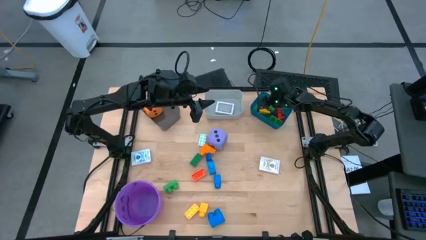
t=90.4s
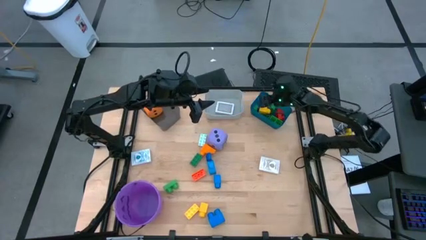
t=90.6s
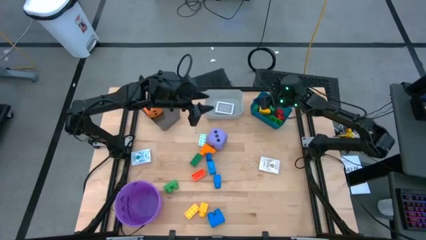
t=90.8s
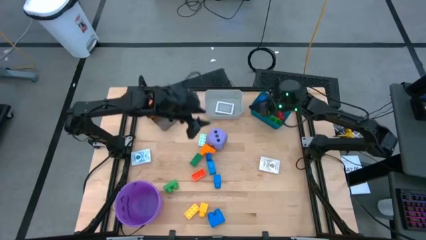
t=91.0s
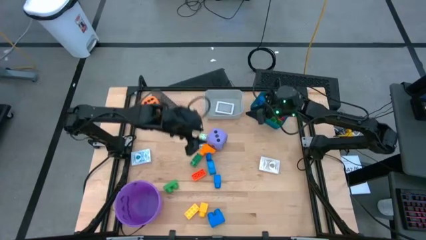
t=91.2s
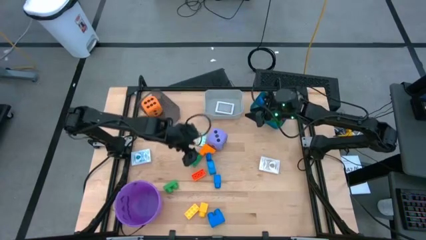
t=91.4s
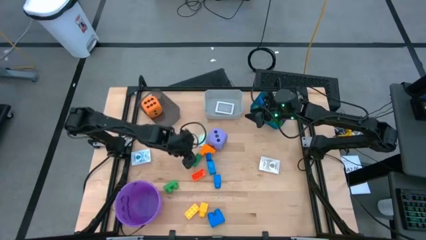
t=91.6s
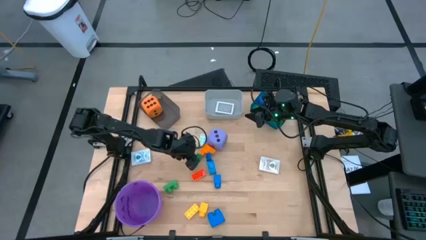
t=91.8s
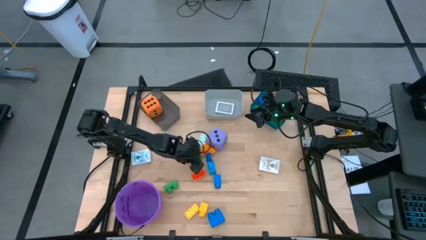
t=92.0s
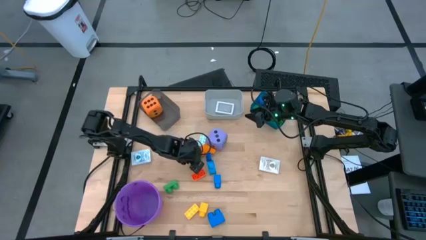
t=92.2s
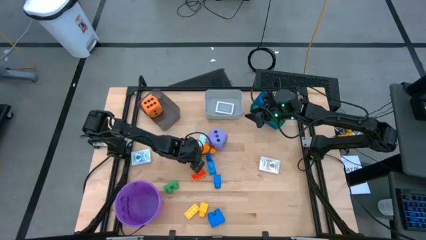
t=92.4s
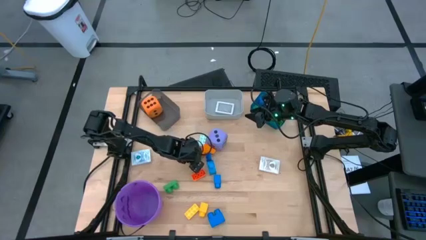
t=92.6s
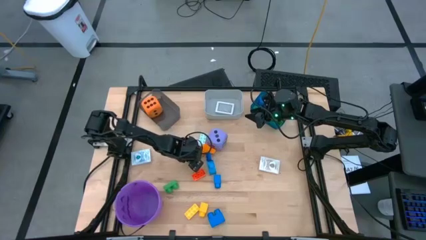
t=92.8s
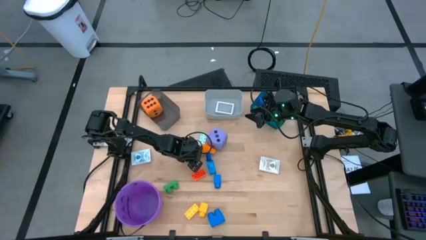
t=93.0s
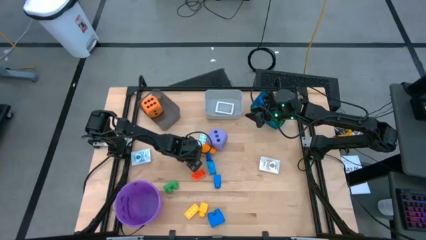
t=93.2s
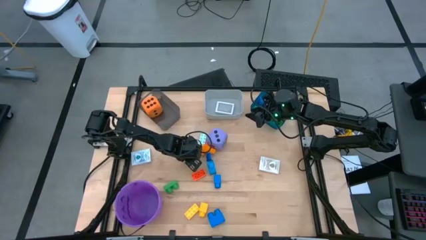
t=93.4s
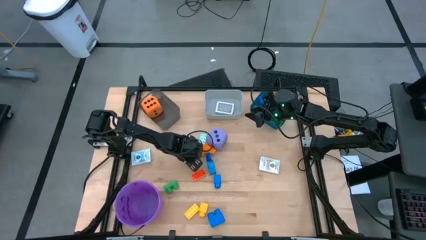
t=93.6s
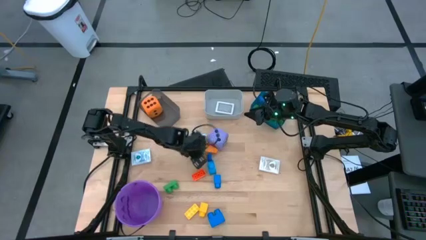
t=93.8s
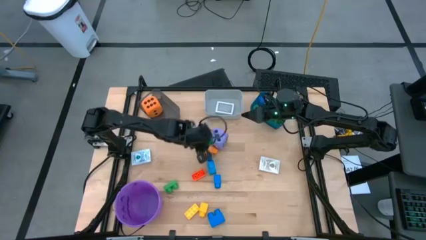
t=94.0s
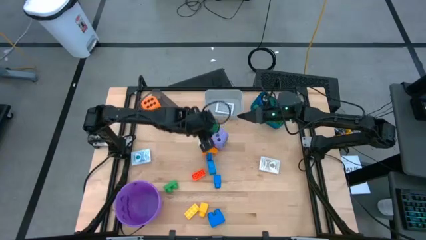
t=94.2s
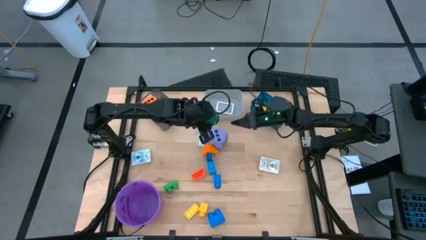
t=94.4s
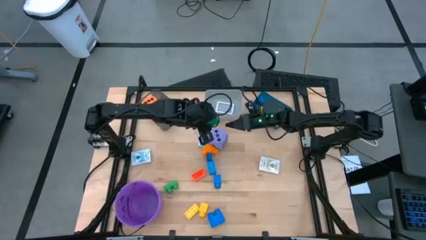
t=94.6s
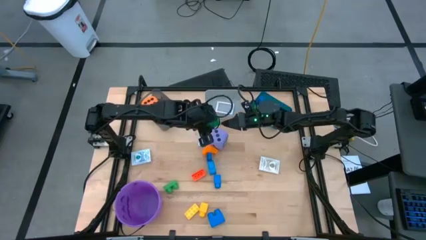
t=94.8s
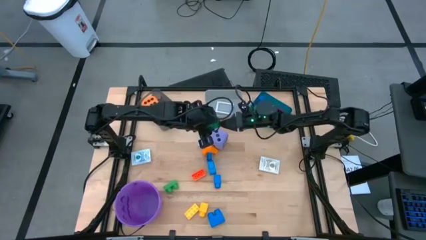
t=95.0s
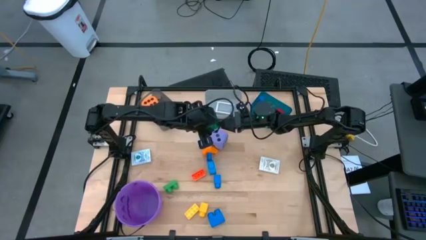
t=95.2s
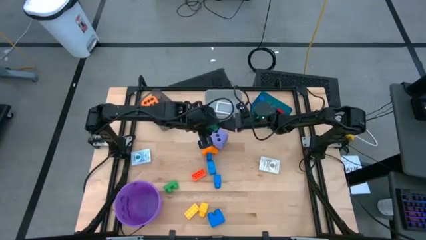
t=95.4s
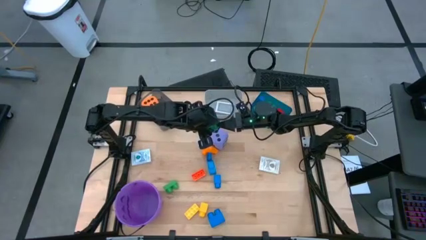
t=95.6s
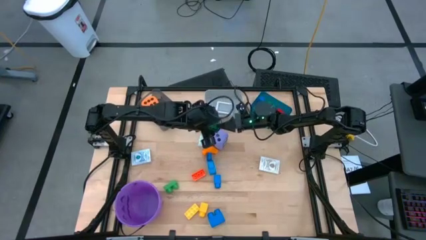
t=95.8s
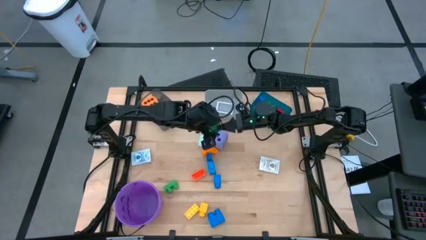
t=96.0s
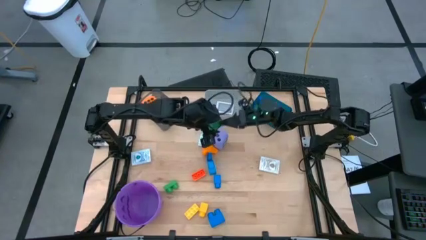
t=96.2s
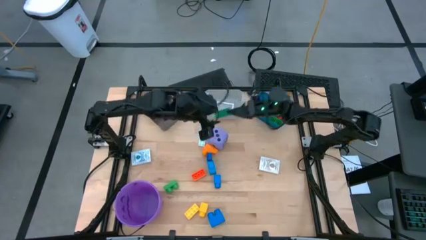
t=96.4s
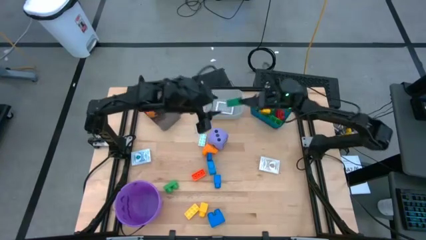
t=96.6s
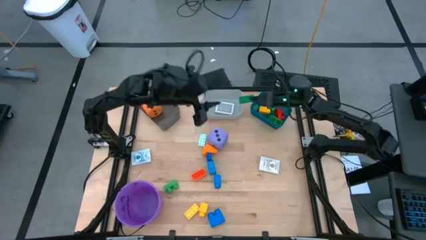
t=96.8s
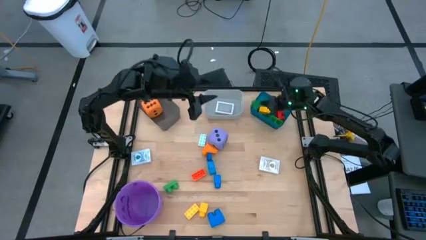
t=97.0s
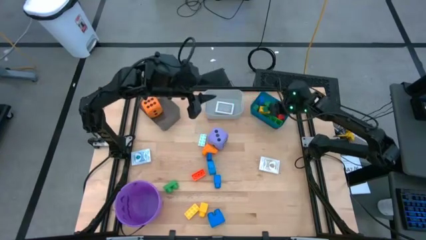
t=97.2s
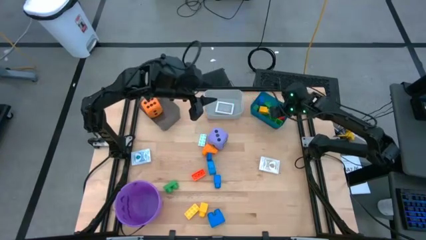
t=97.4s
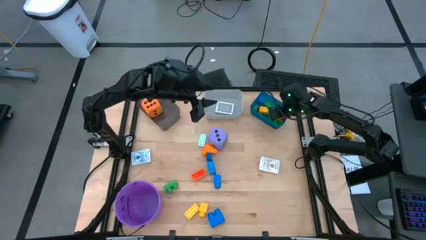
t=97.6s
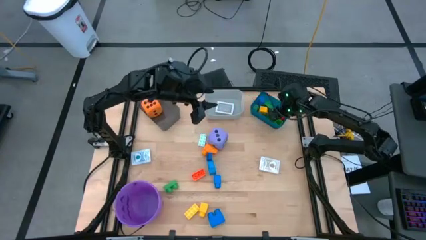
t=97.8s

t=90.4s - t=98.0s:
Task: Pick & Place Toys
Put the dark green game piece into the blue bin

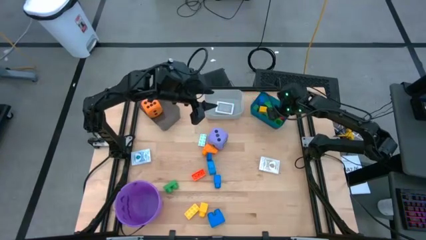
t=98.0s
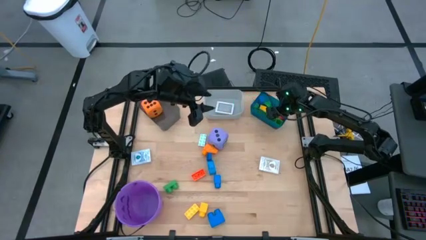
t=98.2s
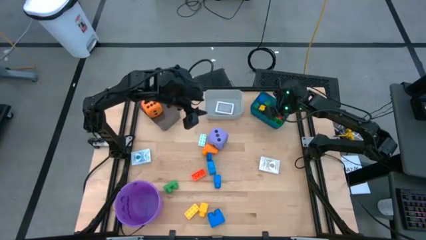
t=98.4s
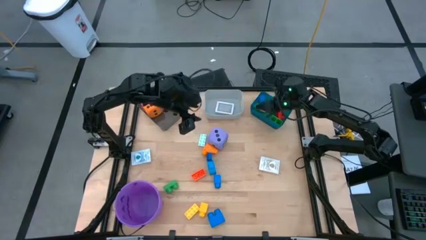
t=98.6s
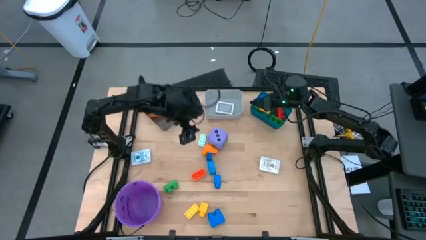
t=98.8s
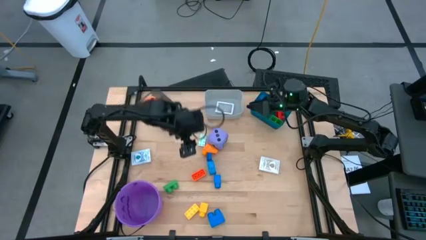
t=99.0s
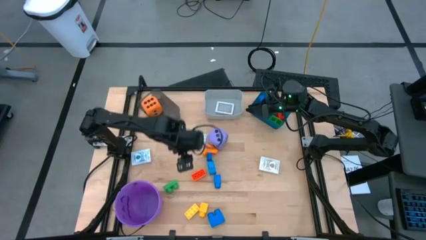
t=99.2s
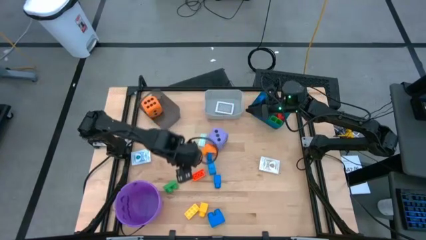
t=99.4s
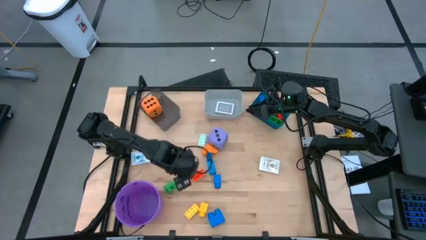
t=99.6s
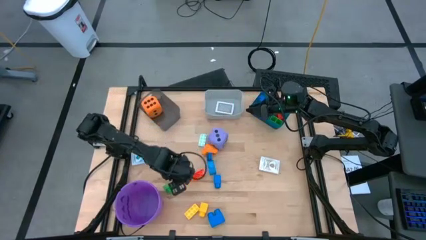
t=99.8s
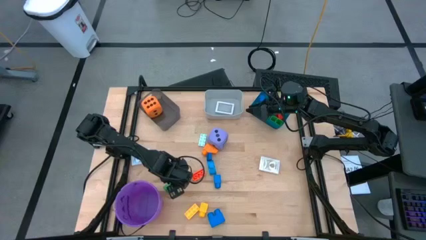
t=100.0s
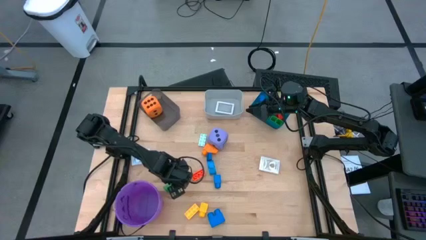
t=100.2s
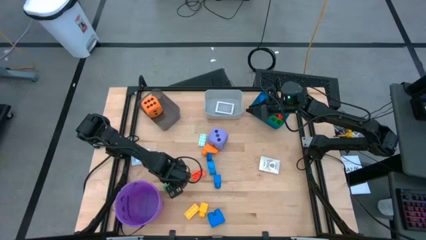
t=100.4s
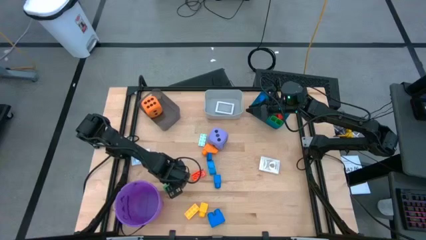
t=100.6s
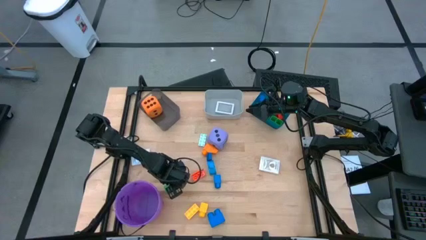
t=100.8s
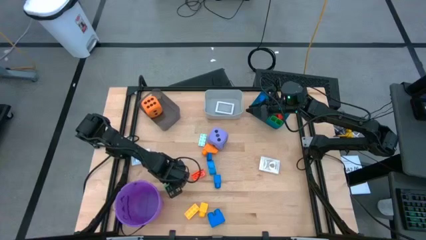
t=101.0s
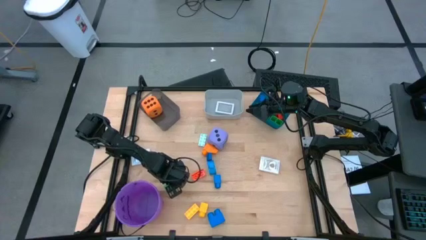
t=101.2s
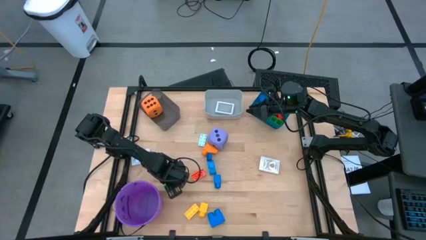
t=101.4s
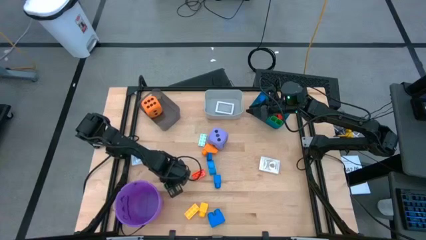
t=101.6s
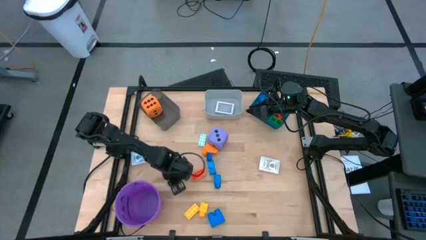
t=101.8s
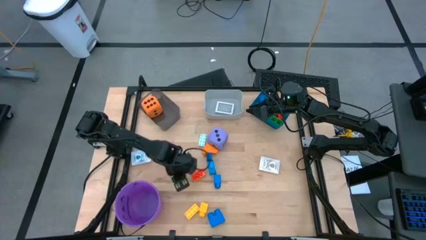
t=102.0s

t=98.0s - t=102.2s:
Put the green game piece into the blue bin

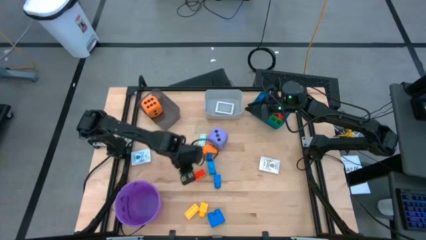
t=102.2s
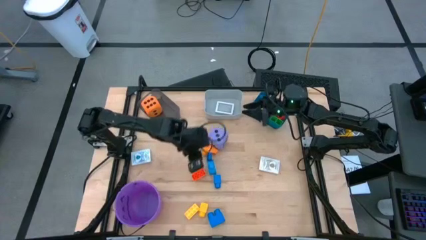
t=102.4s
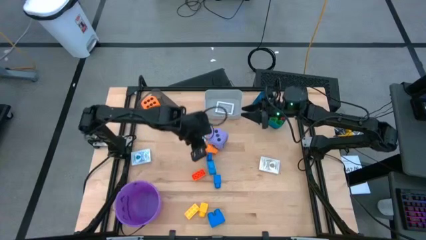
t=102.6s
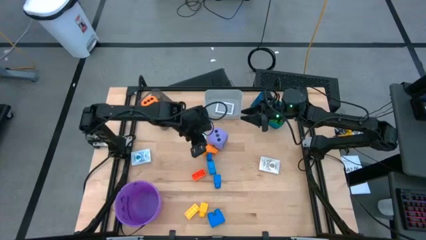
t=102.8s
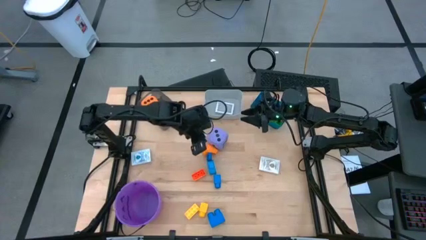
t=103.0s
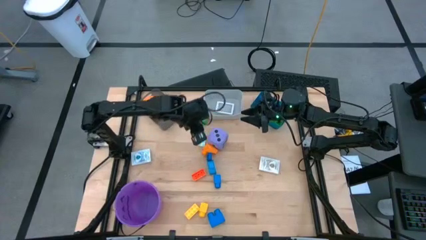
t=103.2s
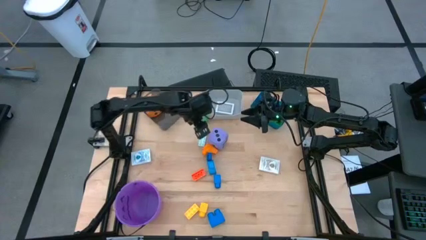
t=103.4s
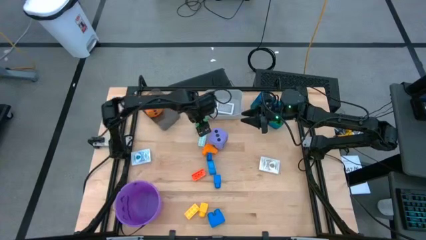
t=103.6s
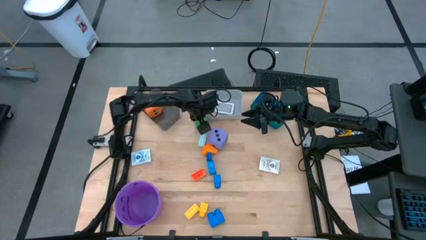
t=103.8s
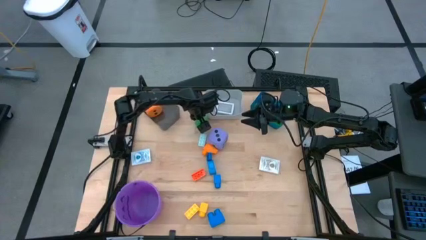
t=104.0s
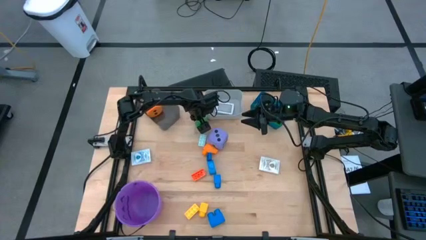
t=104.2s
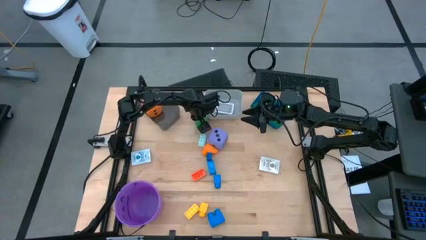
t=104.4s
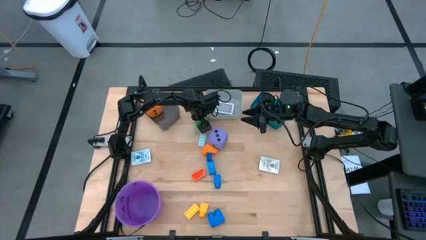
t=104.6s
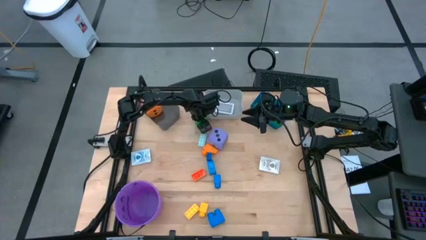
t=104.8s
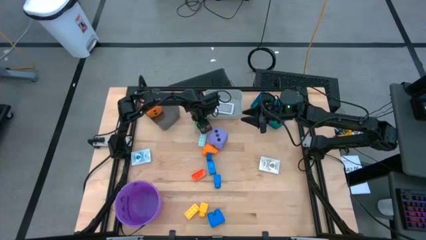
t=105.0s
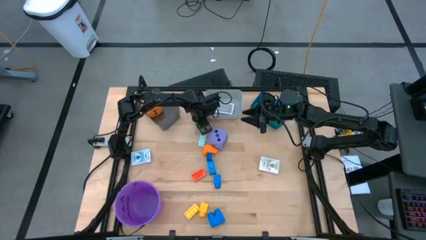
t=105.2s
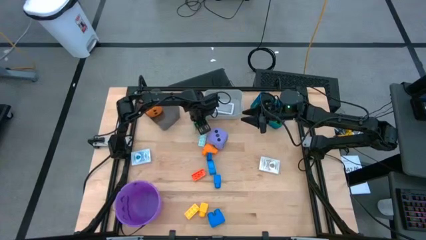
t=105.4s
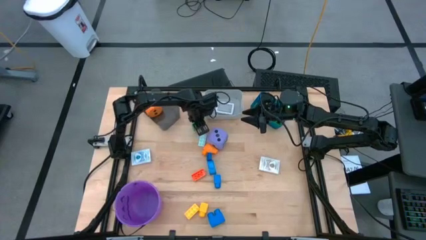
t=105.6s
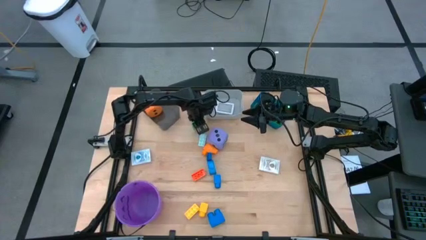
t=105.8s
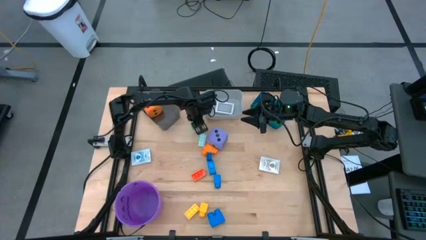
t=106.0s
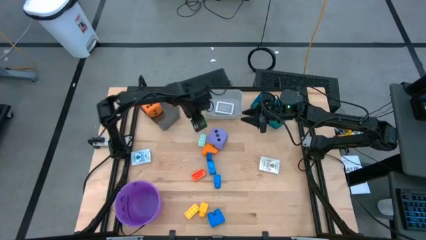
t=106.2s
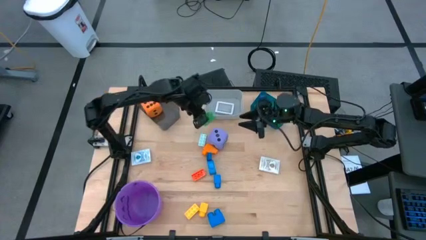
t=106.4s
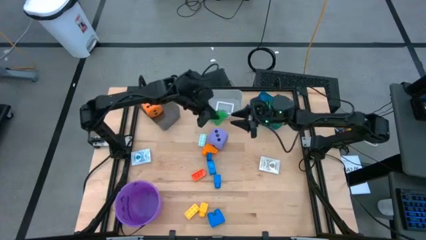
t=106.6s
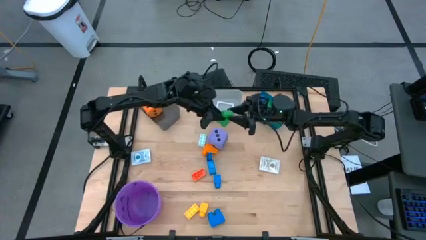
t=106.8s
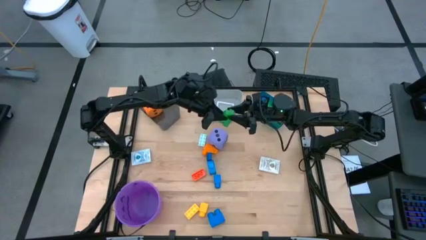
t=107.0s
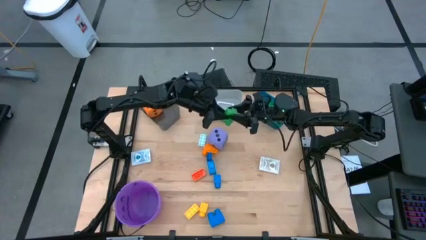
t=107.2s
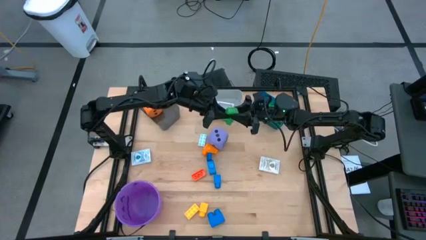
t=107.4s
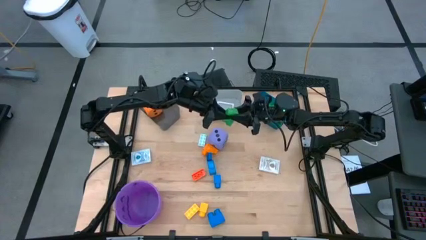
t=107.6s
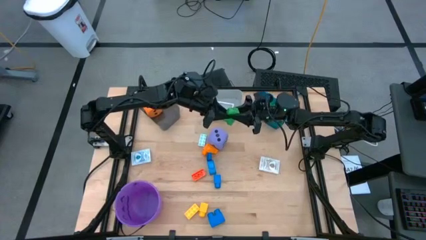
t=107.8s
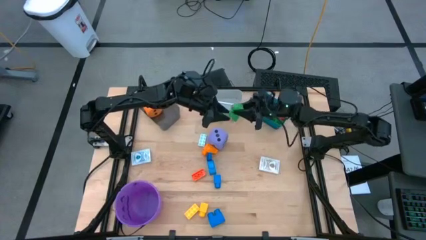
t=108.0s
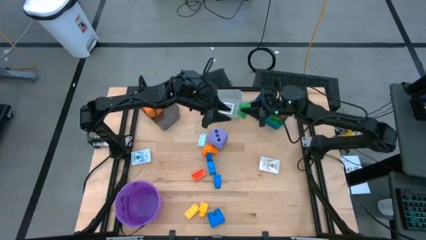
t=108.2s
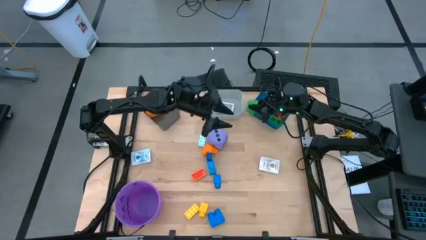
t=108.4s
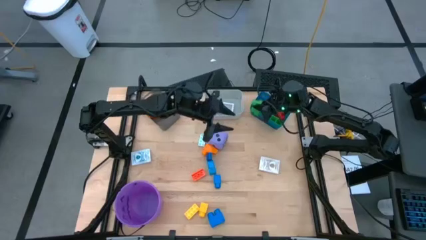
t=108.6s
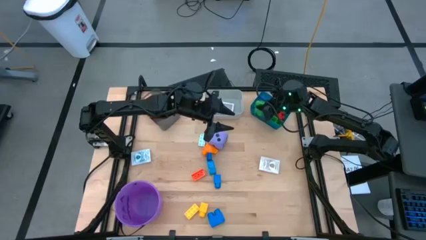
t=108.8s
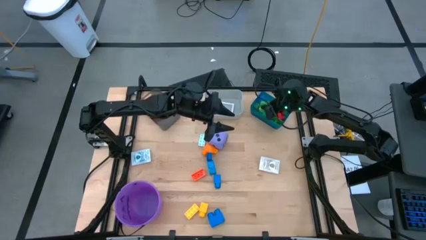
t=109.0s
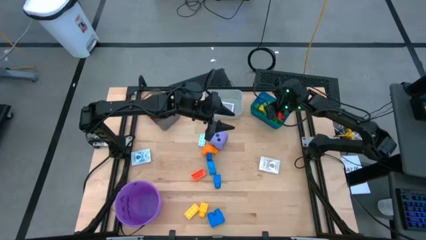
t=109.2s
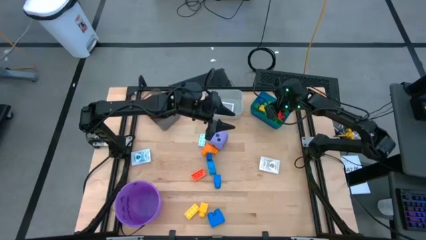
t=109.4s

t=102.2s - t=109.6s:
Put the green game piece into the blue bin
